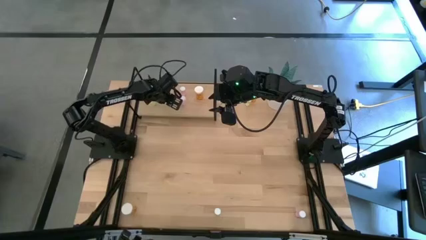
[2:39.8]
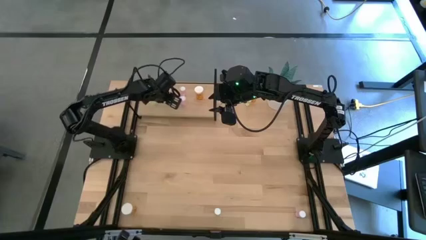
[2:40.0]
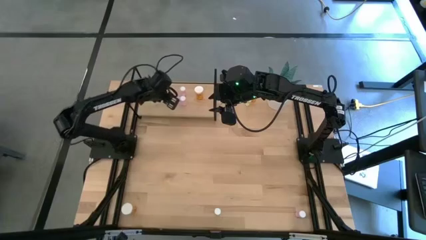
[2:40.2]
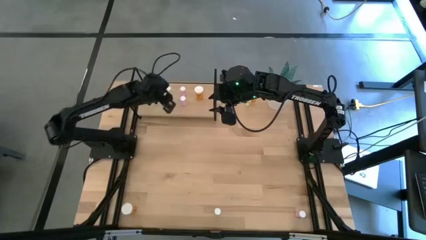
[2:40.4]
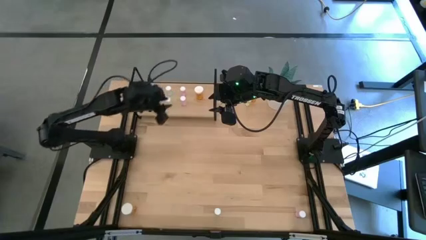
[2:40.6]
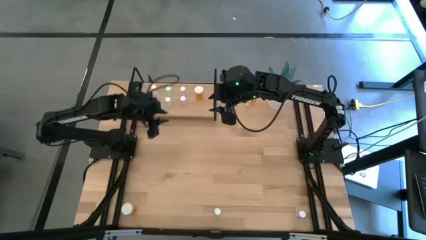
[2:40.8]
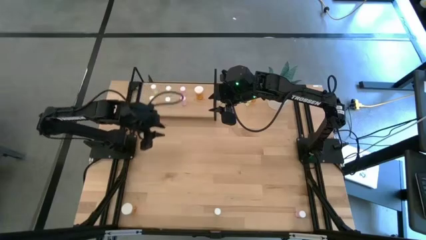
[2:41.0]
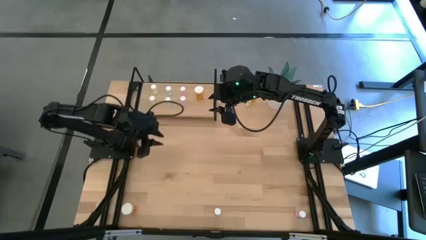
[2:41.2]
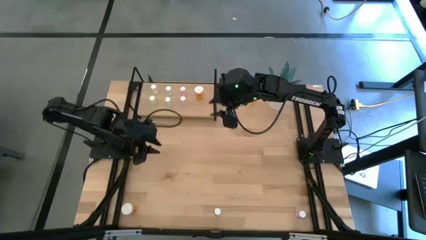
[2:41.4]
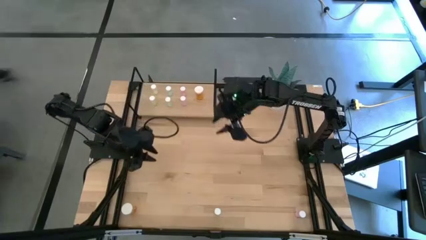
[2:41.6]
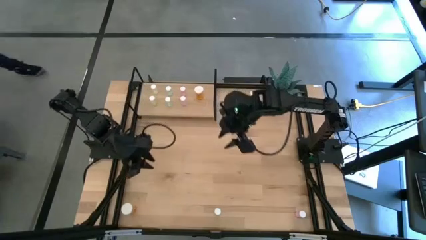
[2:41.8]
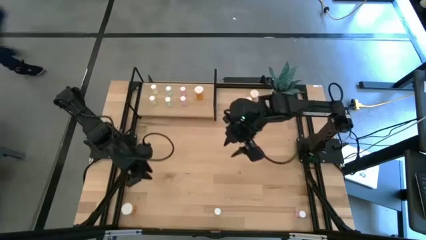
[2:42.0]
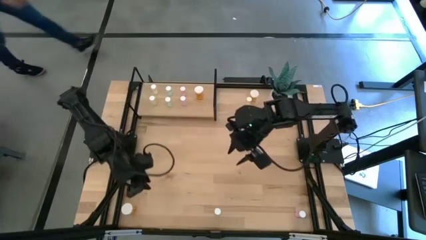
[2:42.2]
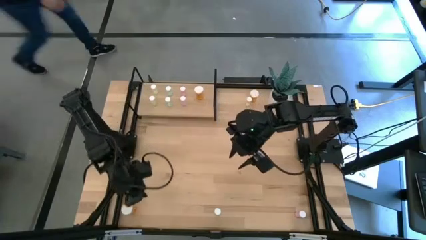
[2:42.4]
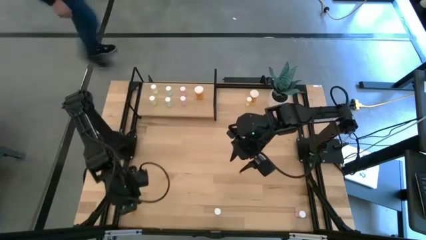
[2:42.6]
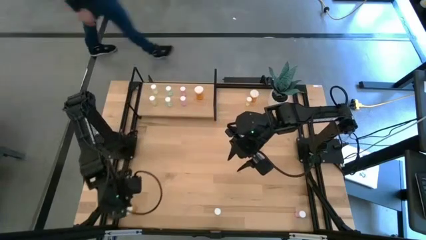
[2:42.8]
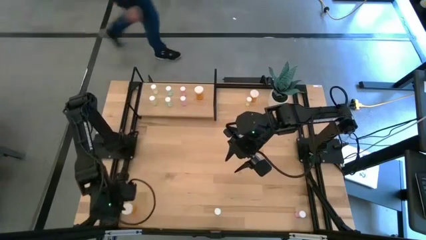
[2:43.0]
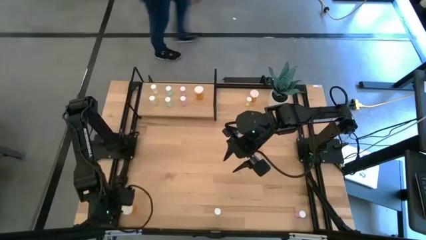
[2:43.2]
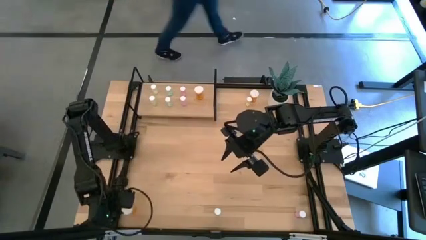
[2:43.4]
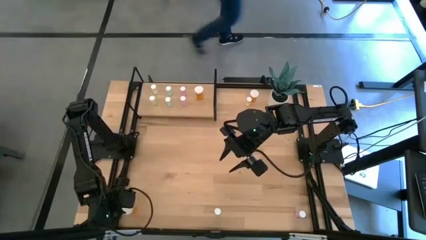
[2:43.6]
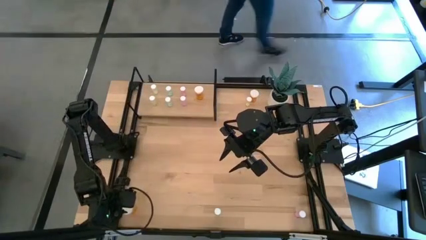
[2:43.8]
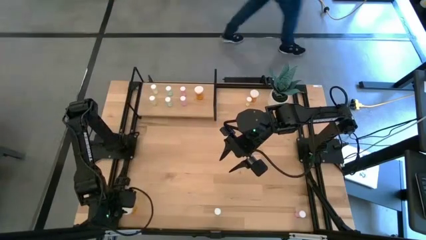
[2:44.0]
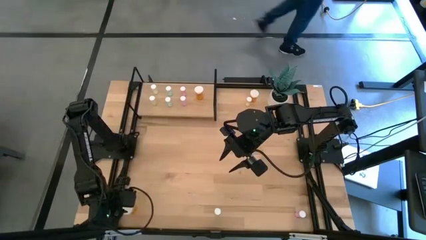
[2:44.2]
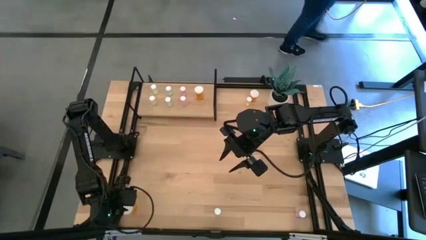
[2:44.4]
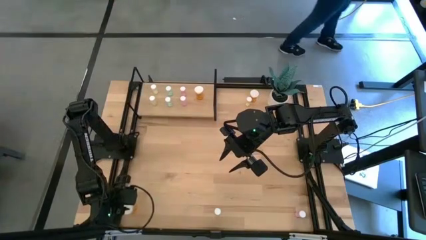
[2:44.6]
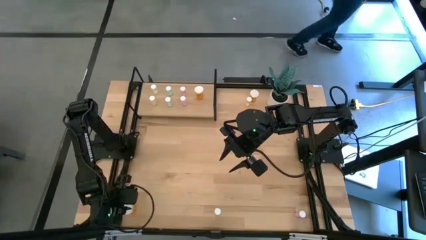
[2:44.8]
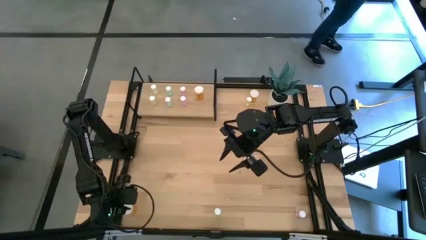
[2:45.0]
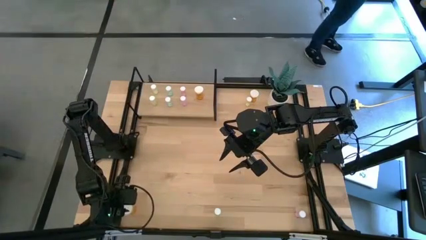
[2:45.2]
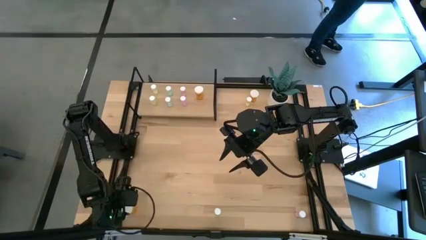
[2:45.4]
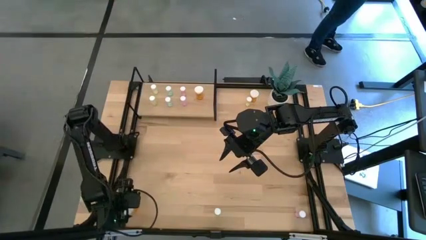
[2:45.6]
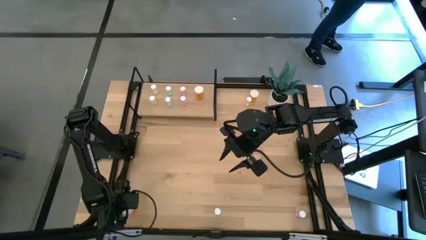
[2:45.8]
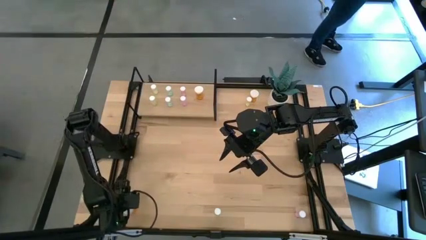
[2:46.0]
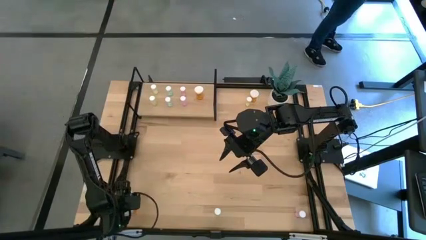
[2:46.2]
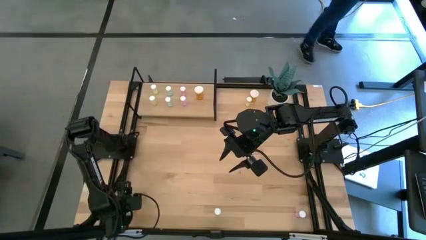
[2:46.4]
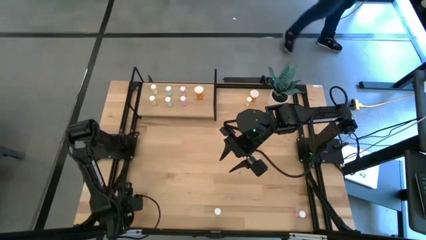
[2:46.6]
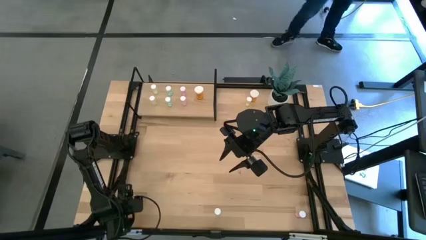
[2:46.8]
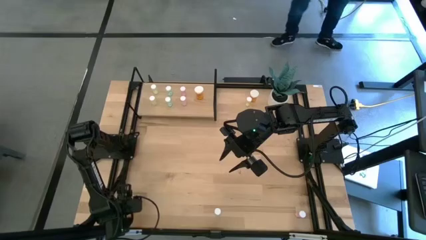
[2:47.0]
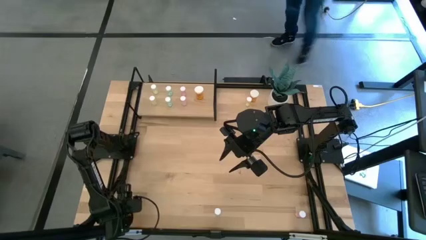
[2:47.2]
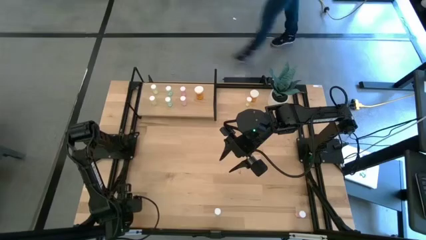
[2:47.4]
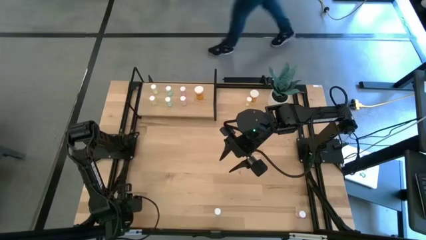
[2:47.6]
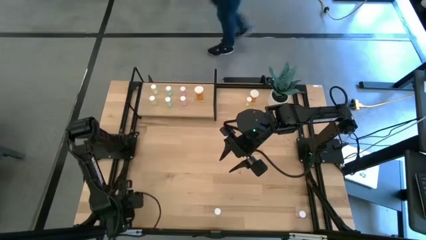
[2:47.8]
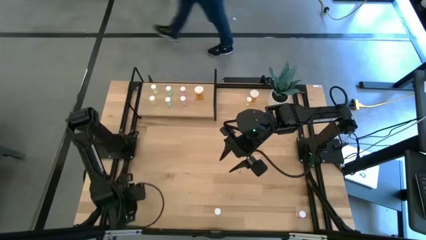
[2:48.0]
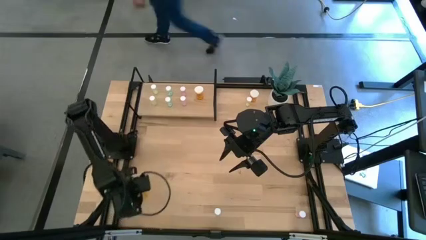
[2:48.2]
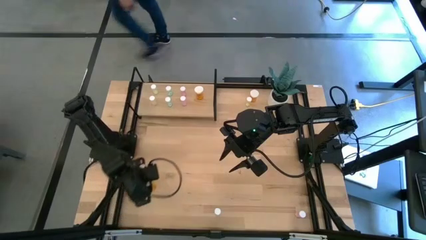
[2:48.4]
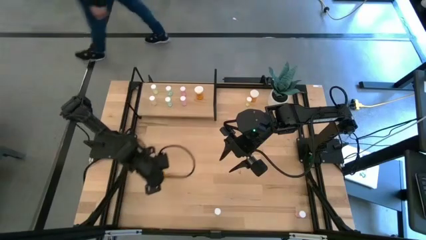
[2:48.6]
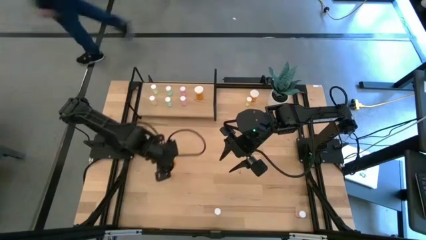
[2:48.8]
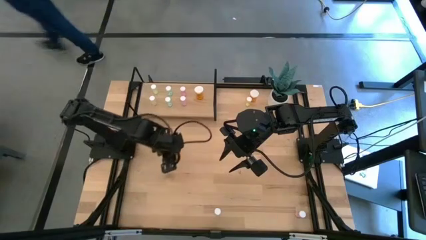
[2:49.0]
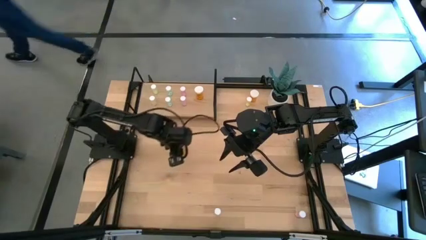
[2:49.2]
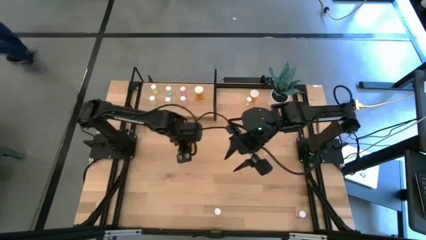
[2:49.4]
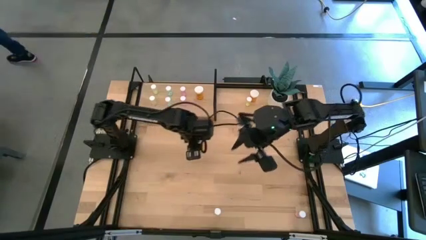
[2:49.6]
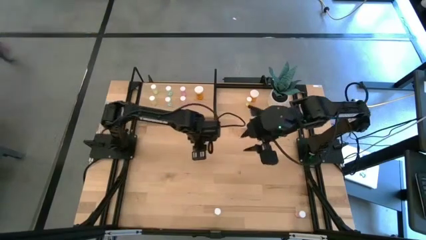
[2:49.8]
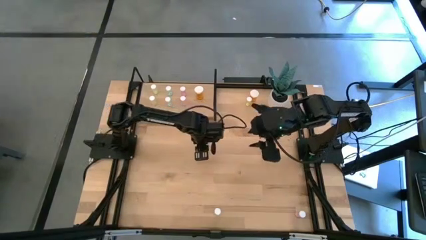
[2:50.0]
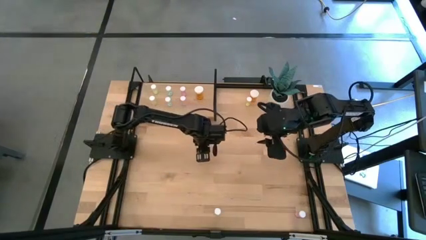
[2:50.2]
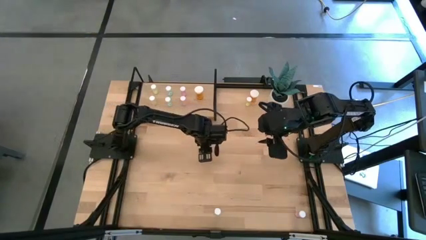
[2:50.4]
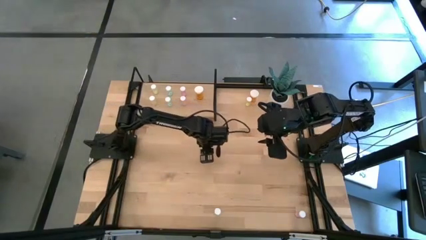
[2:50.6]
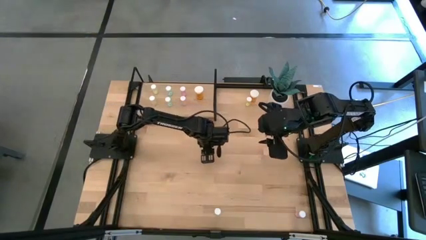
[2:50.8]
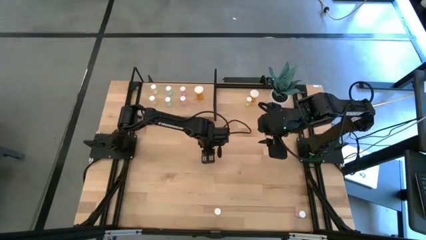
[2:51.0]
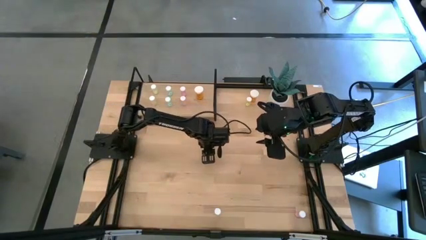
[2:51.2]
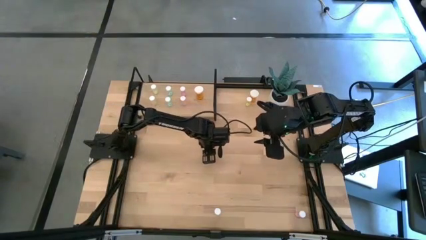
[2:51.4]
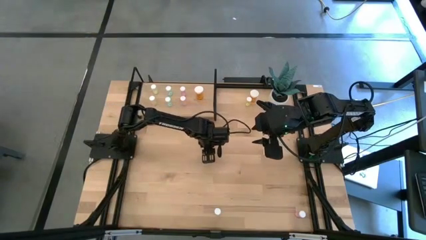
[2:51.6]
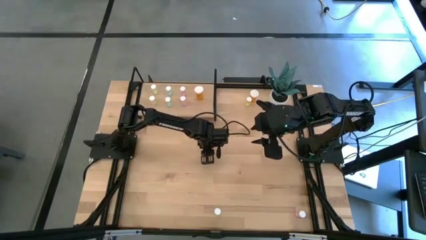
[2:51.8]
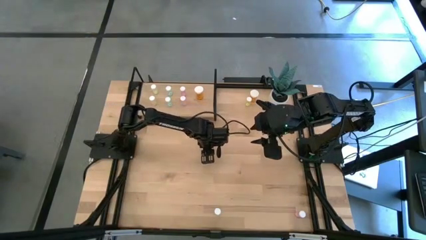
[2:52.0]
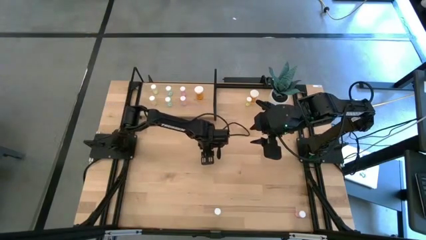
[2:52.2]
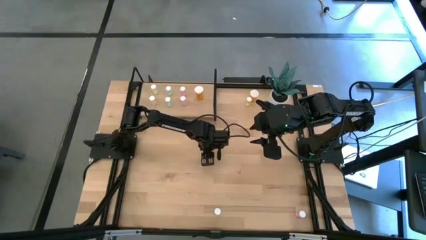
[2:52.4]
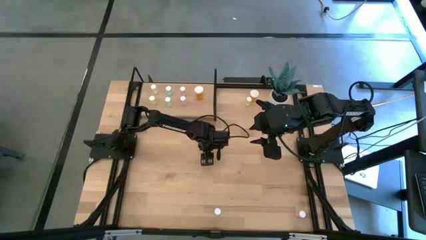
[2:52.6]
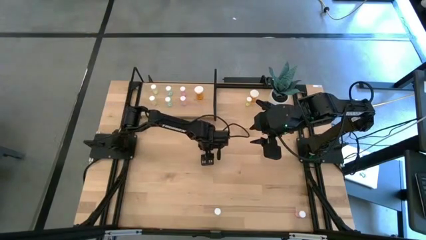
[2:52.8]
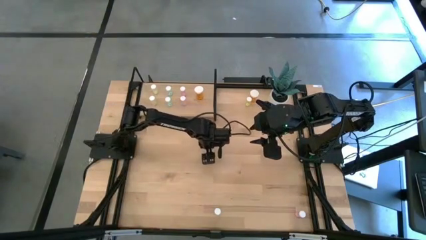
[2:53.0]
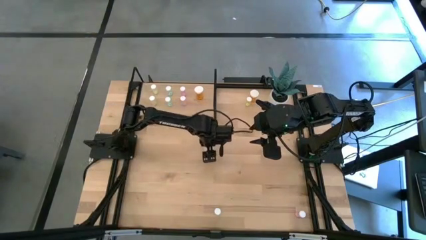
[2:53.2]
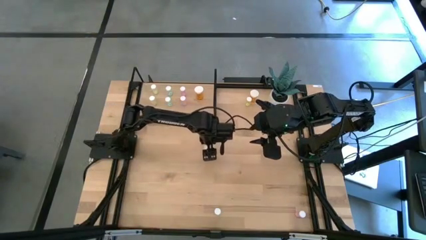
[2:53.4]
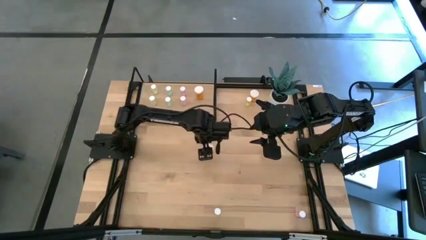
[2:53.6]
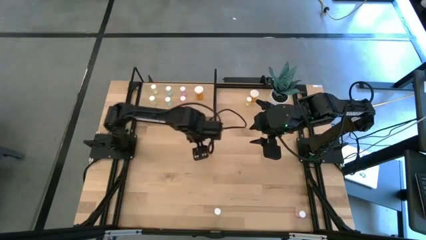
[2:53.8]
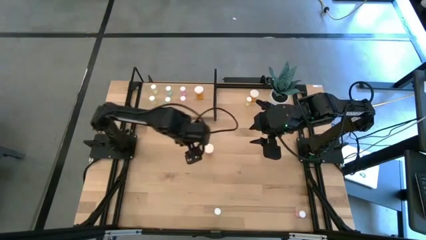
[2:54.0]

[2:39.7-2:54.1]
Task: Pick and place medicine bottles onto shelf by color
Put the bottom orange pill bottle on the shelf and align it with the other orange pill bottle

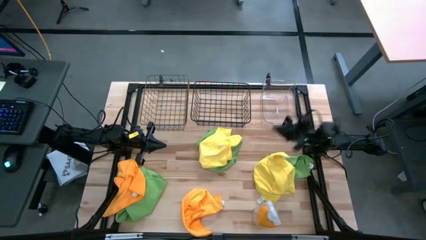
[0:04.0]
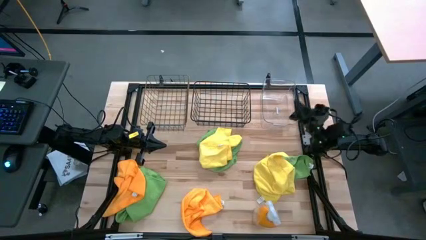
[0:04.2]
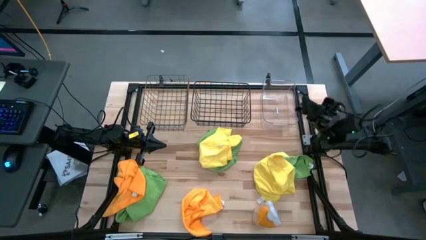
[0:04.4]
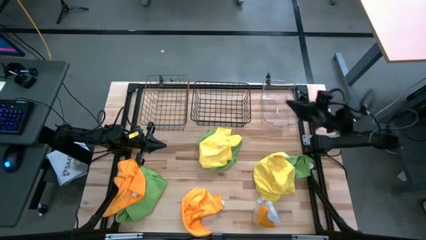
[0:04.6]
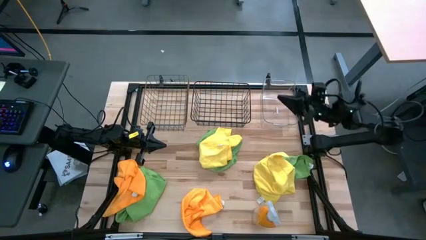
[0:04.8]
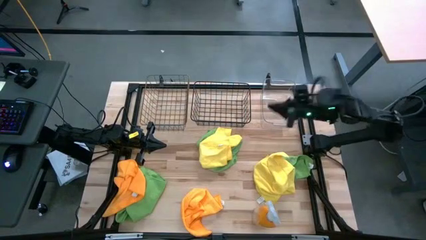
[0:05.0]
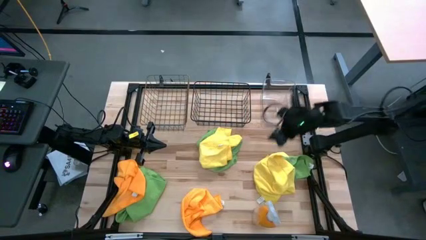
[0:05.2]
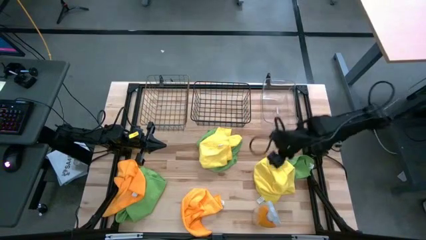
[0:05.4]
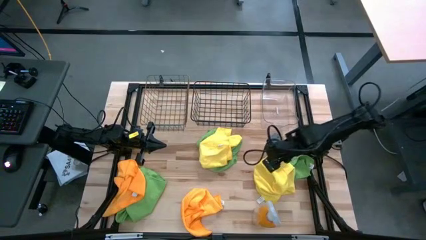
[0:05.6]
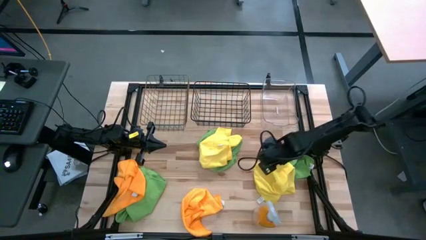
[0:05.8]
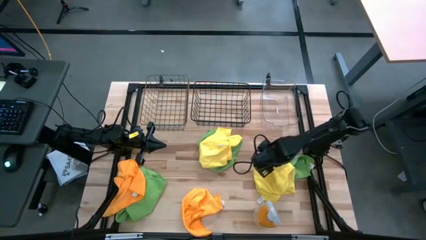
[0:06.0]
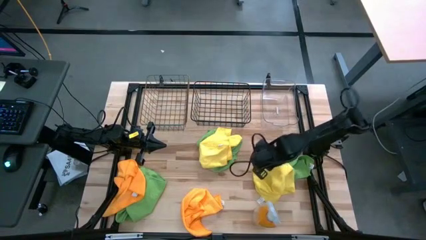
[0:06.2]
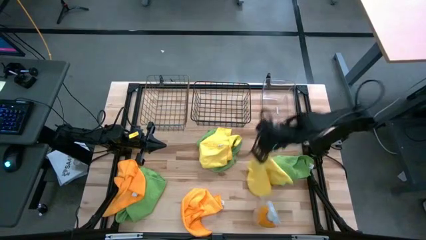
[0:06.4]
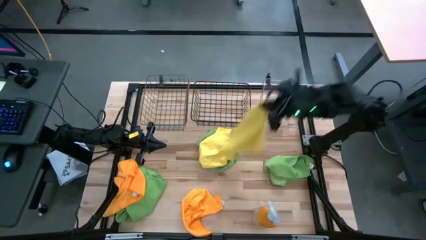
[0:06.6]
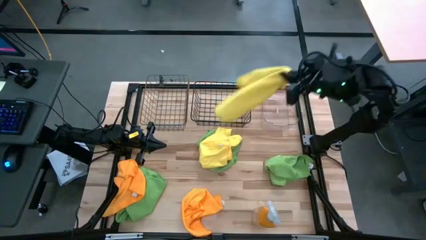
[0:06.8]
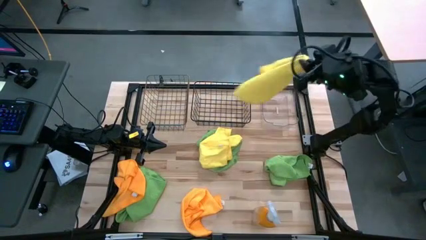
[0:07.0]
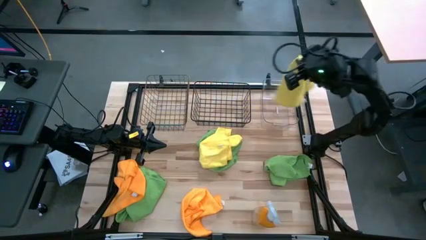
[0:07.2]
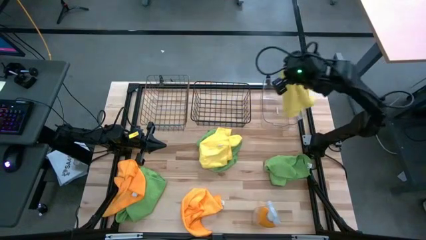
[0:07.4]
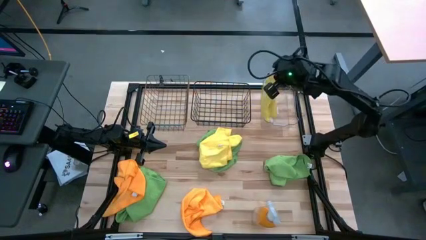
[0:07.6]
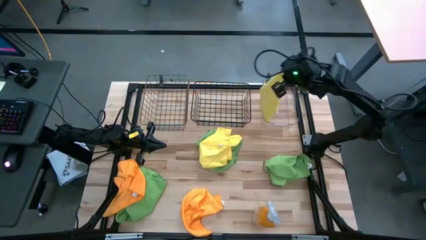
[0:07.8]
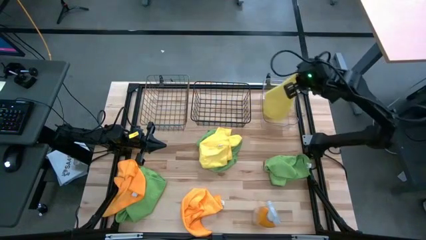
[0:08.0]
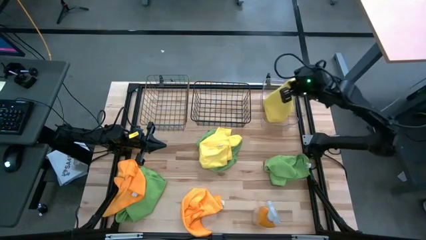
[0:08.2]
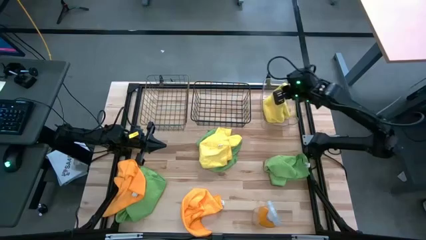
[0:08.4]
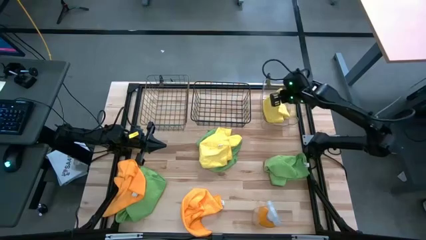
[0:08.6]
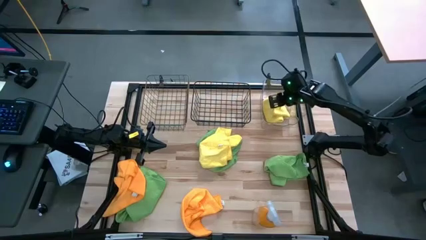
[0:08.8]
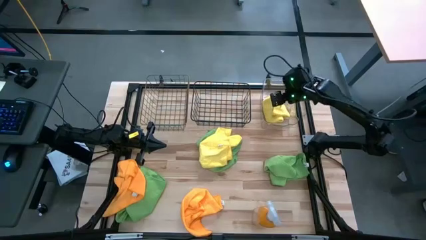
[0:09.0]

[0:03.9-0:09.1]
Task: Sort microfiber towel by color & place in baskets
Put the right yellow microfiber towel into the transparent bin
